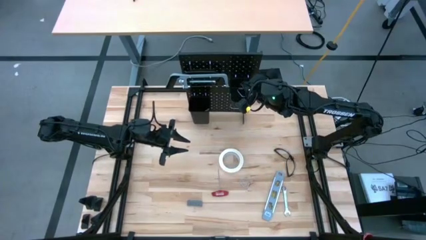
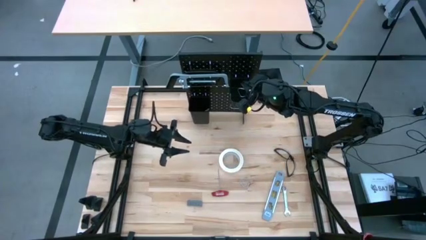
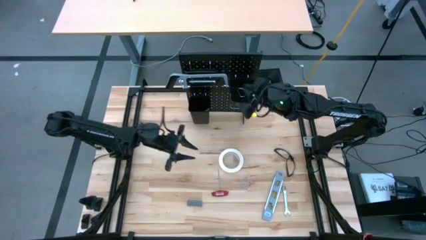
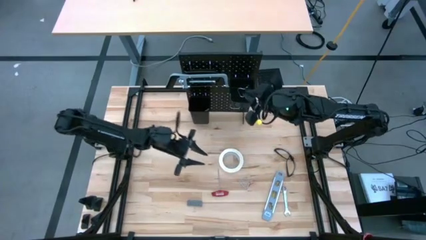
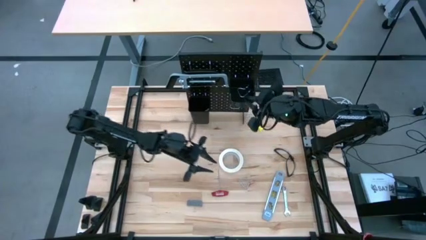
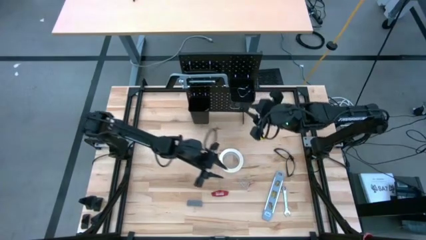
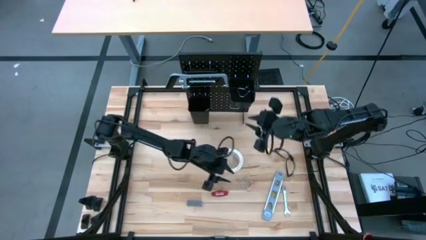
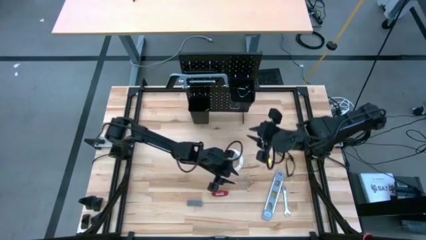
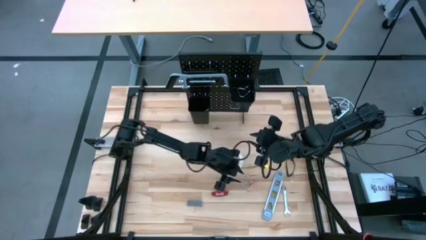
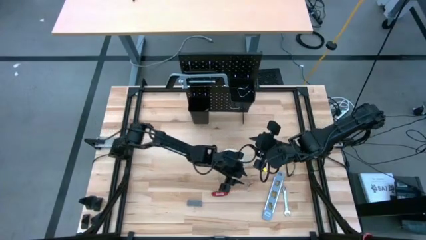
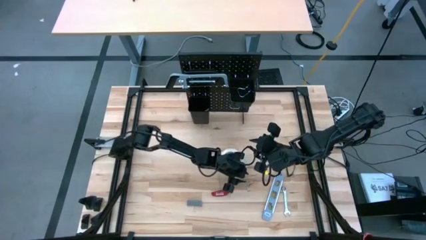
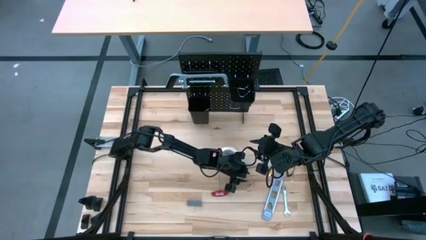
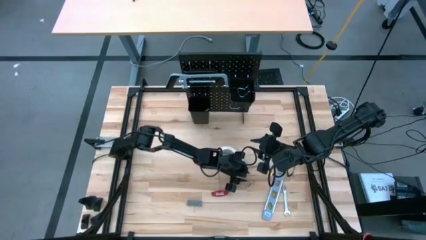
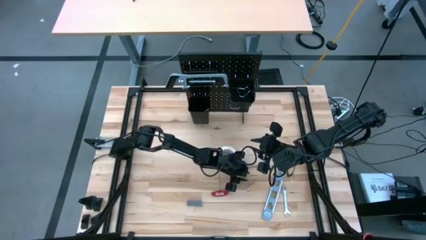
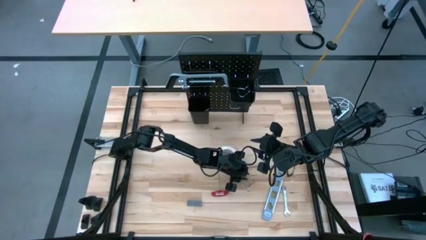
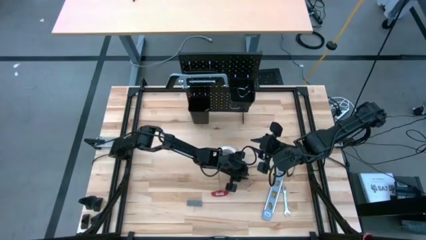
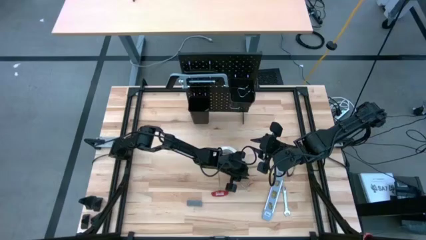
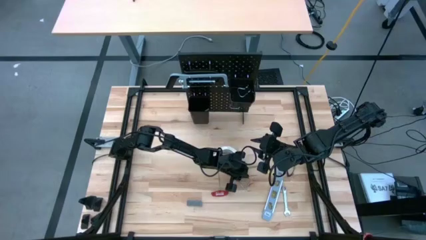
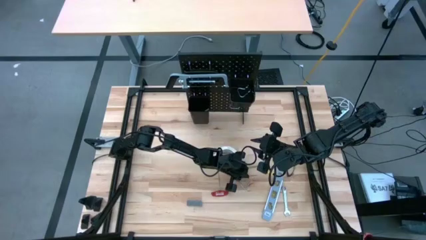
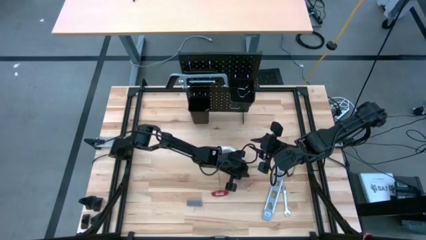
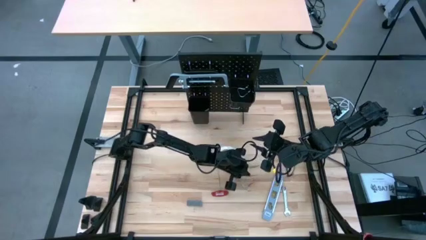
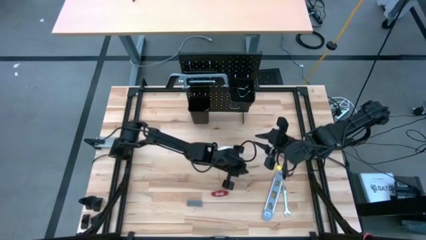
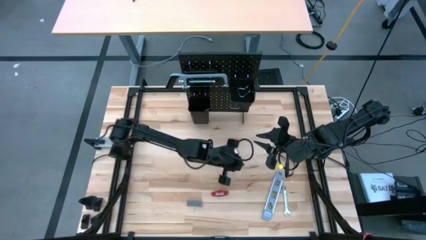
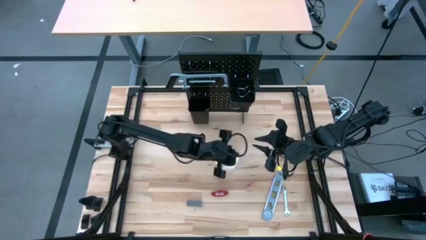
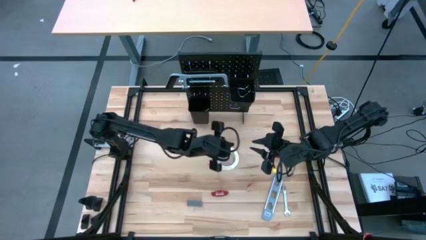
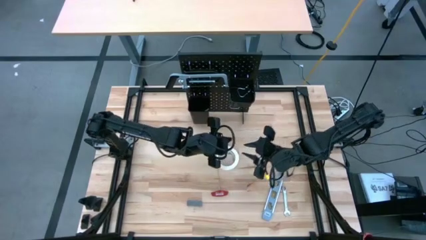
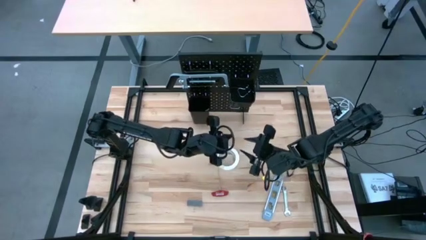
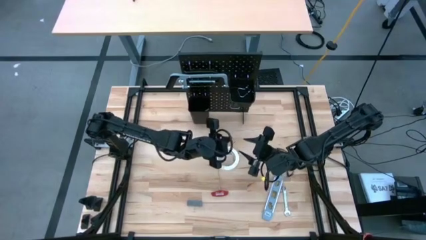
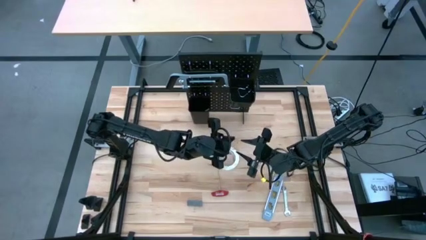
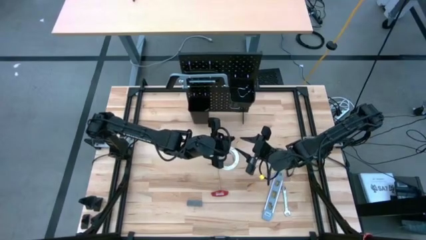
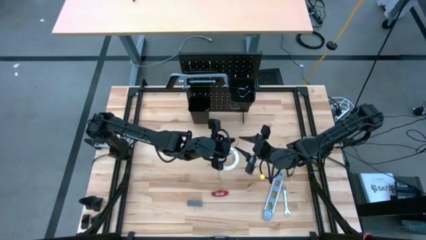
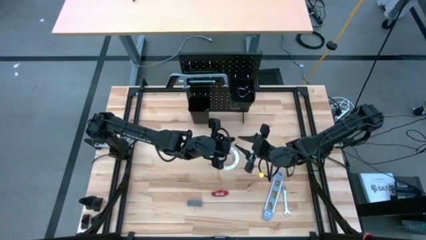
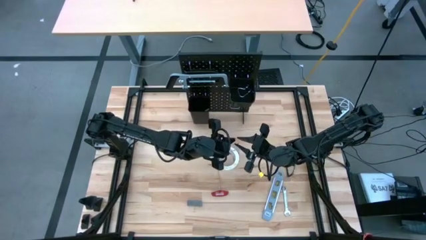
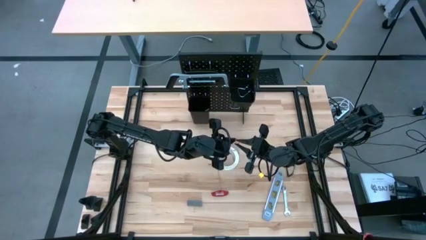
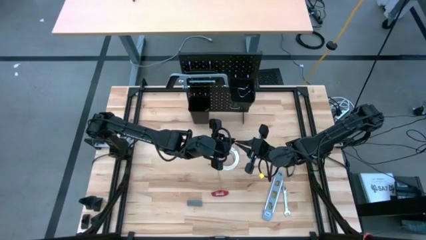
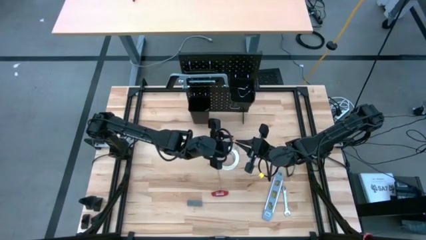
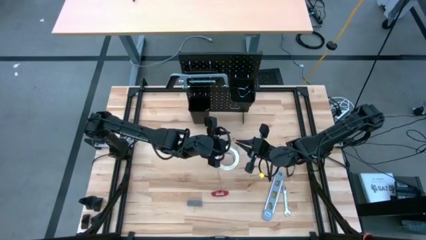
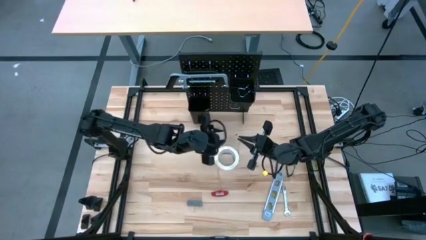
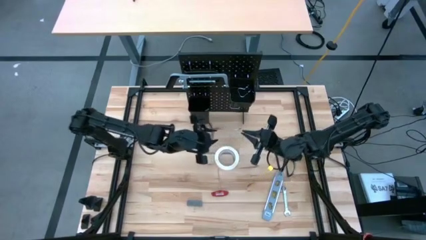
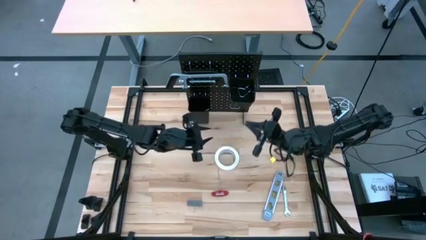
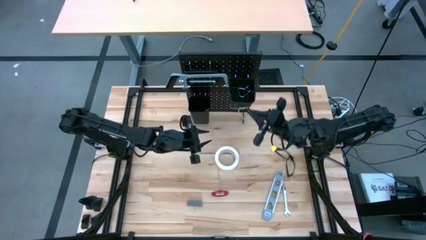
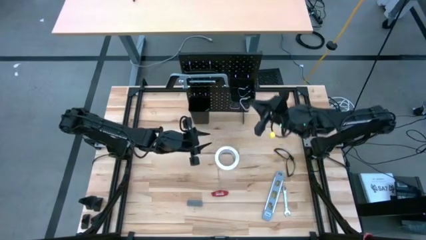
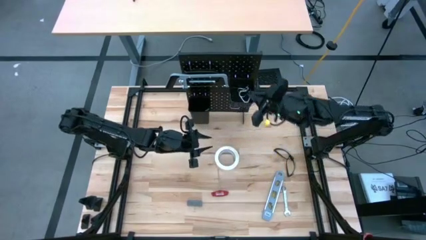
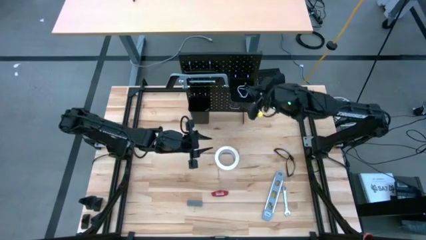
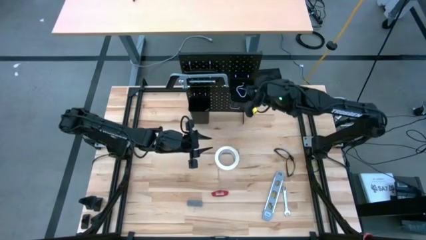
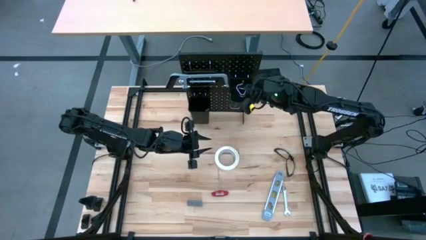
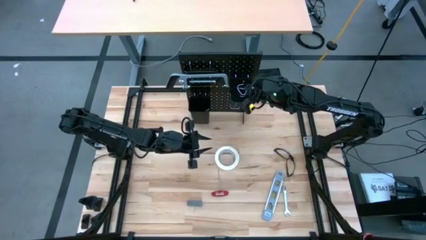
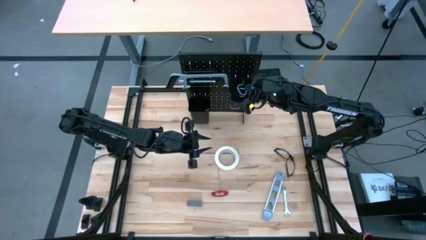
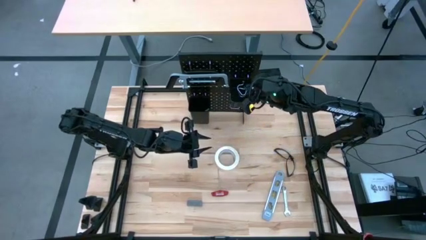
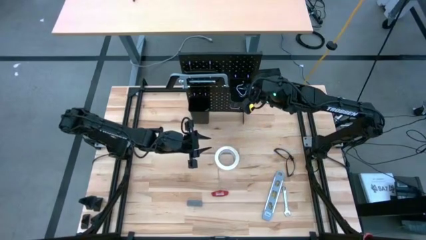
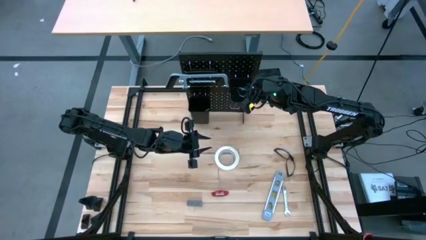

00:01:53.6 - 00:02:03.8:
Task: Hang tools onto peg board
Put the silver peg board hook into the right black tool bin

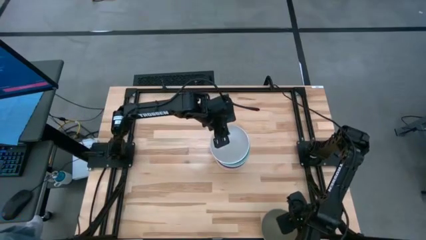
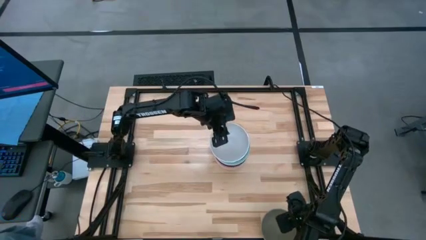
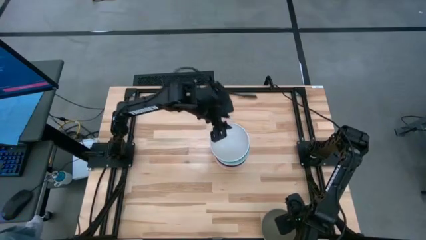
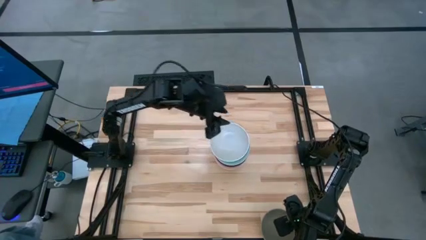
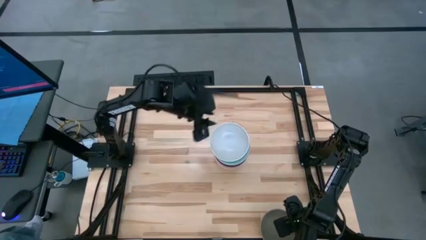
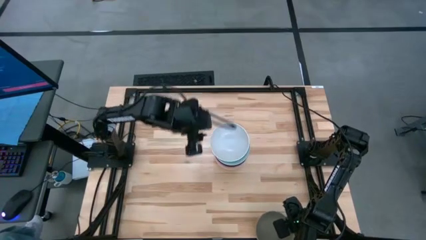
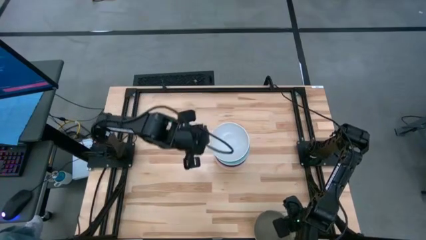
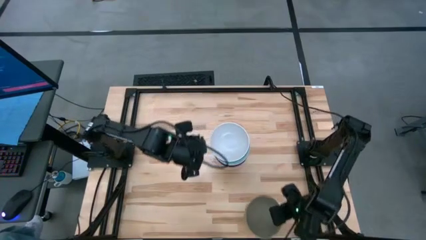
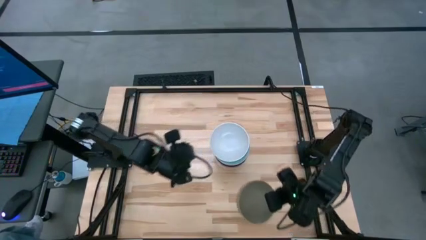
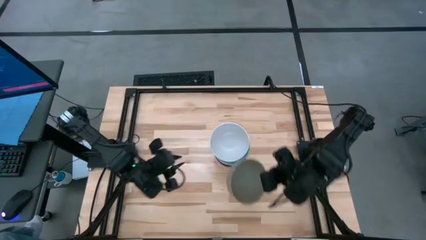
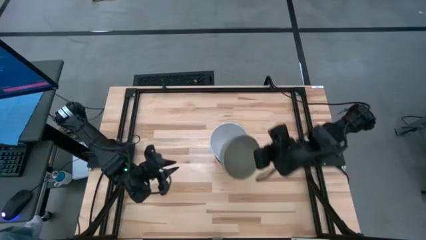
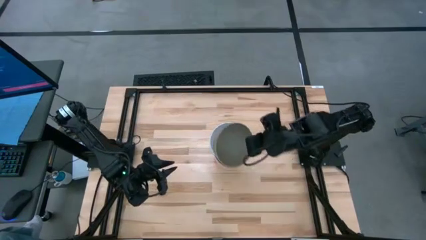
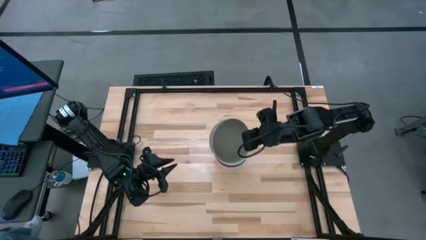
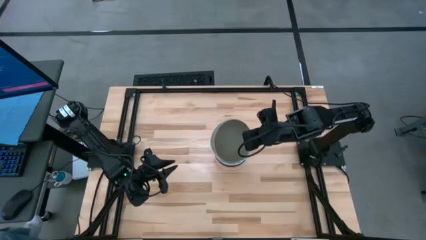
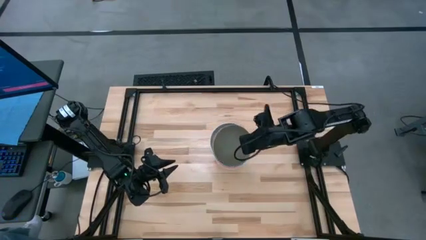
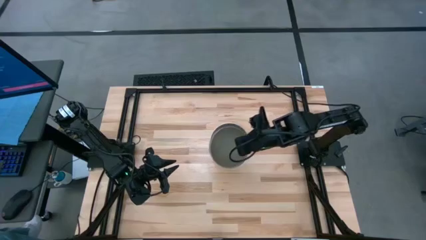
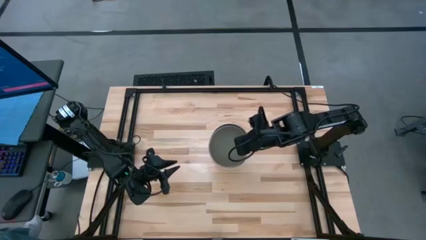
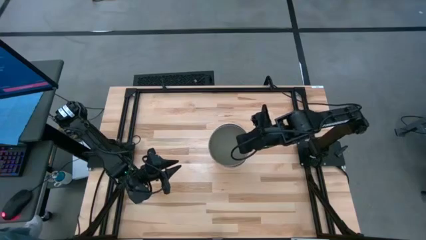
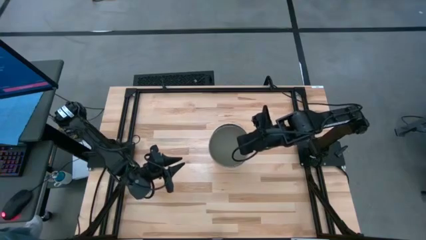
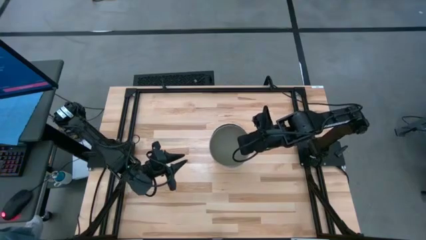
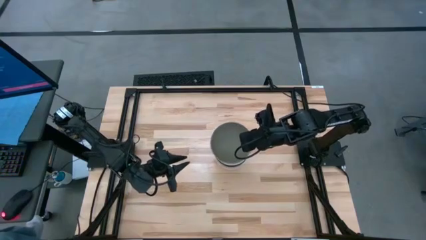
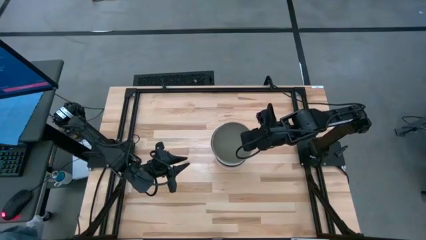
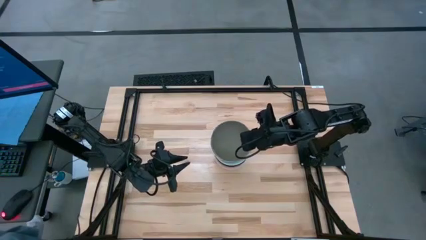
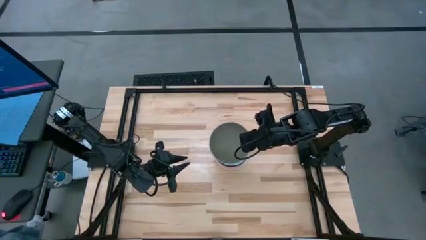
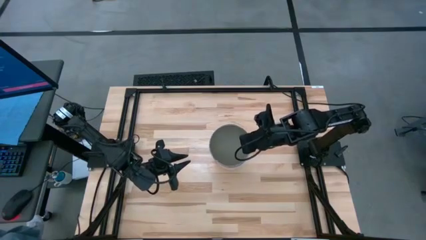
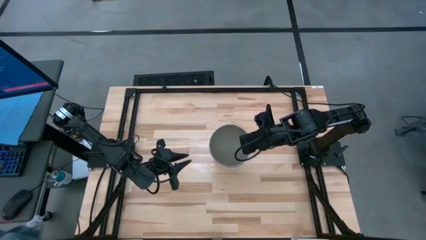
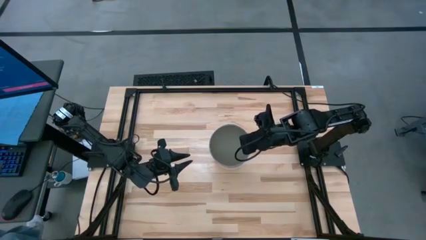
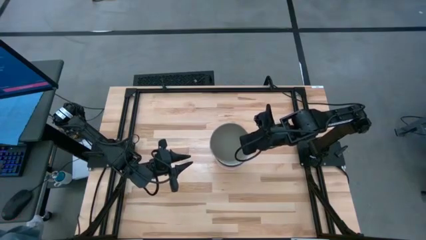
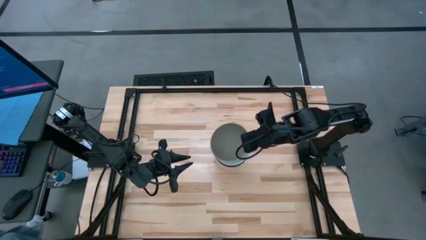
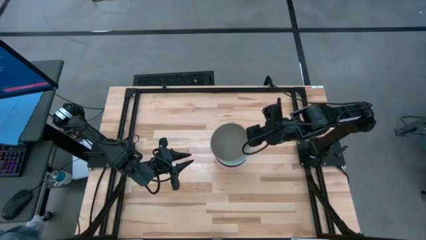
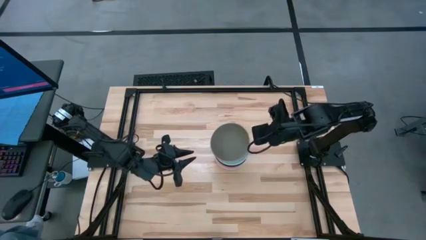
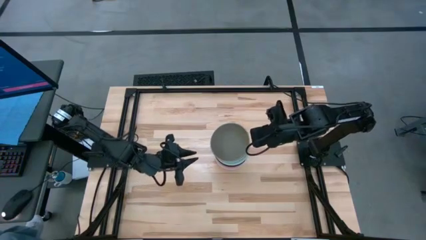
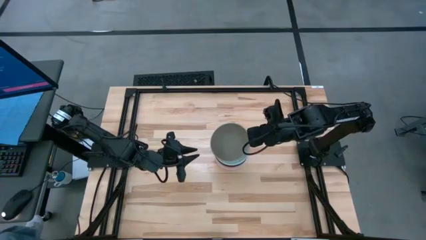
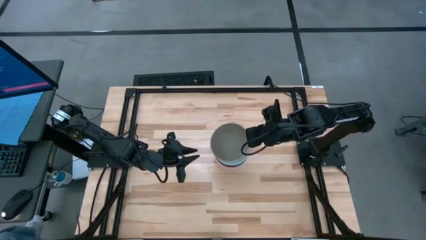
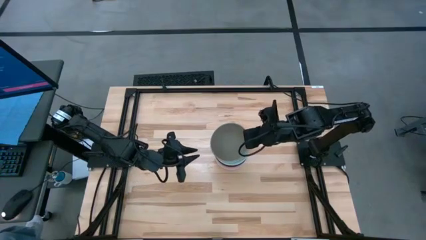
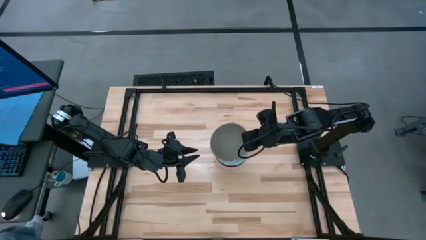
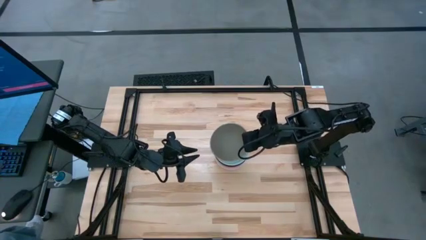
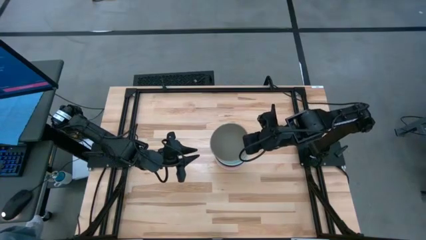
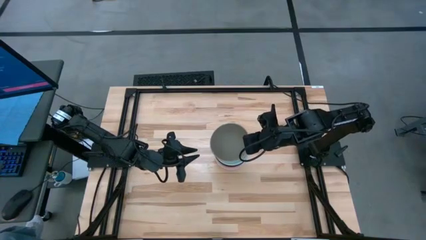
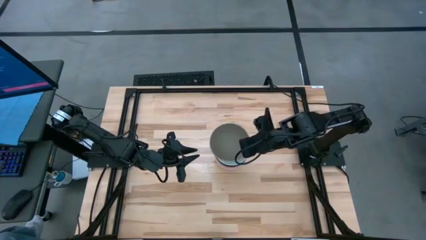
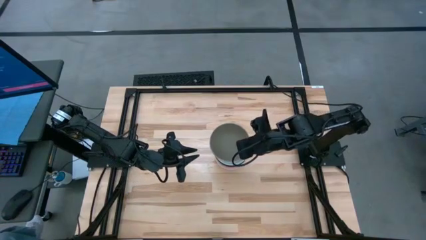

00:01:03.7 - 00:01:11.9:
Task: Nest bowls inside each other
Stack the gray bowl on the white bowl
